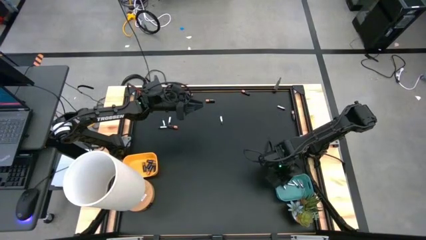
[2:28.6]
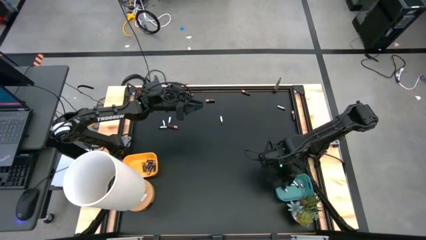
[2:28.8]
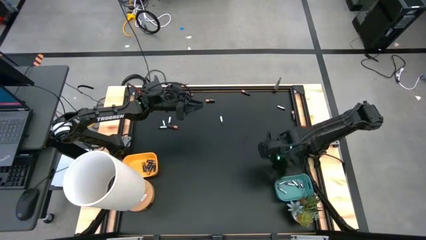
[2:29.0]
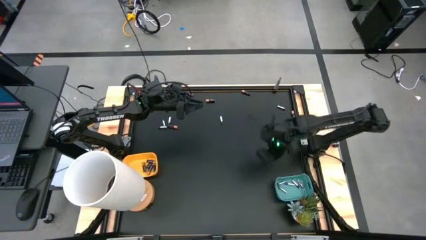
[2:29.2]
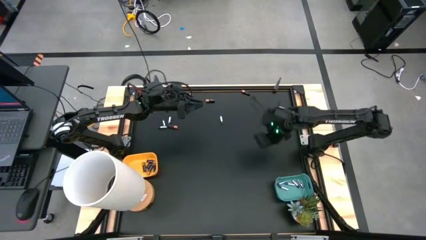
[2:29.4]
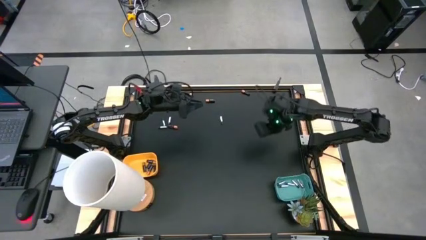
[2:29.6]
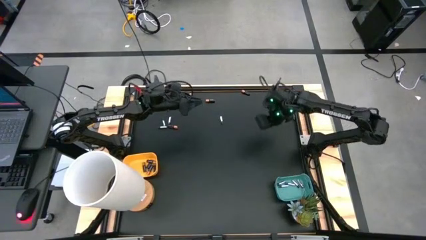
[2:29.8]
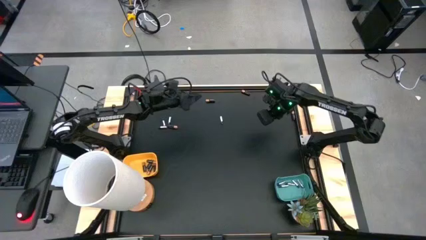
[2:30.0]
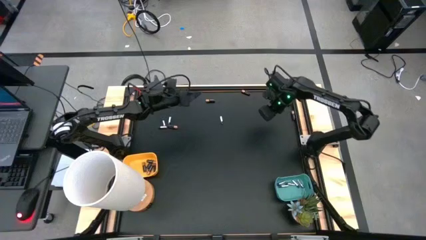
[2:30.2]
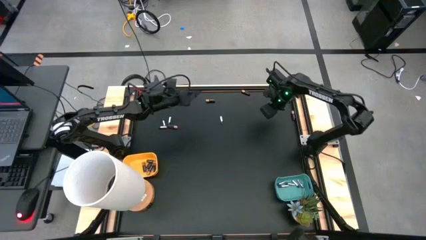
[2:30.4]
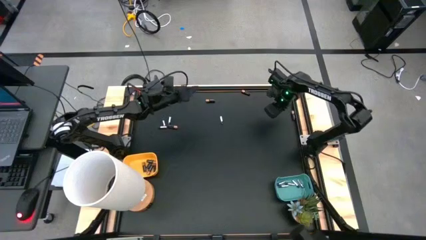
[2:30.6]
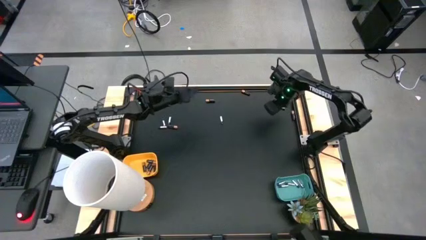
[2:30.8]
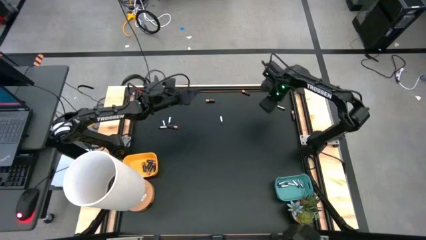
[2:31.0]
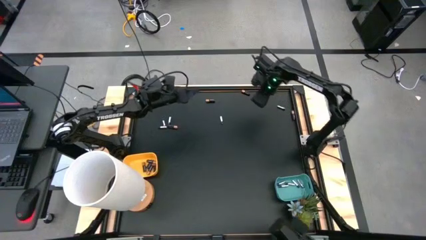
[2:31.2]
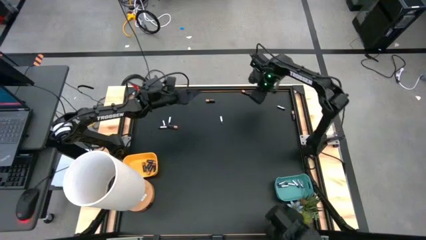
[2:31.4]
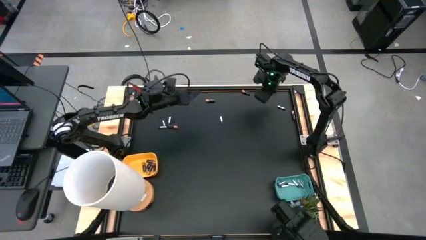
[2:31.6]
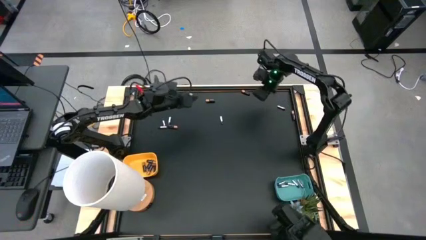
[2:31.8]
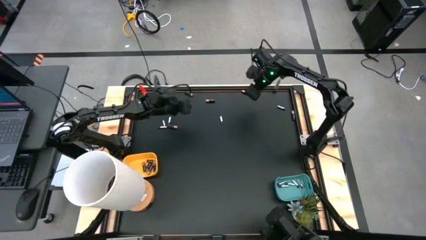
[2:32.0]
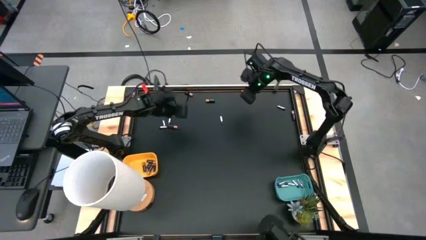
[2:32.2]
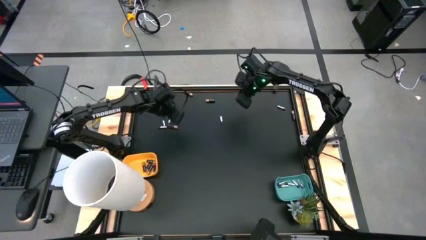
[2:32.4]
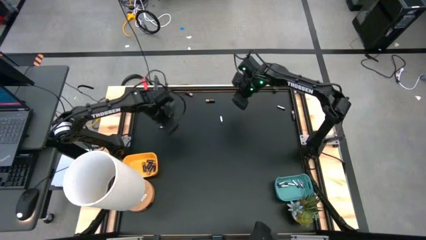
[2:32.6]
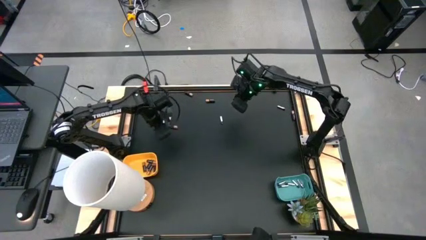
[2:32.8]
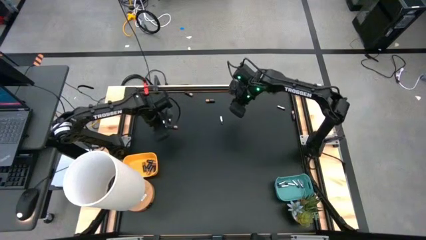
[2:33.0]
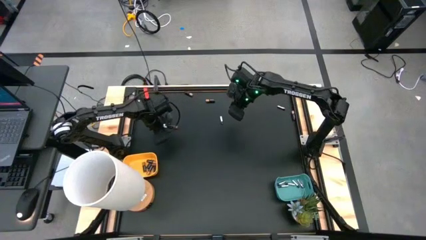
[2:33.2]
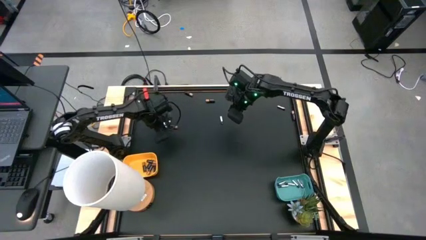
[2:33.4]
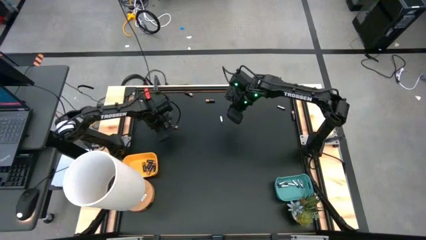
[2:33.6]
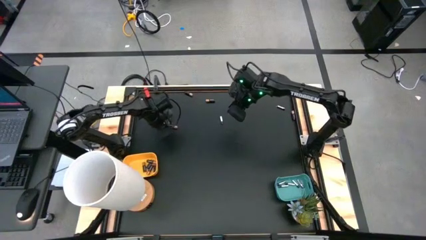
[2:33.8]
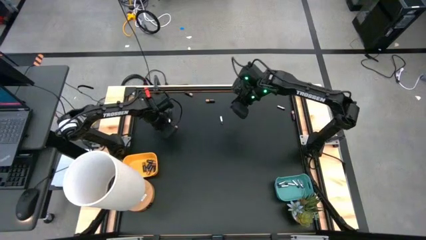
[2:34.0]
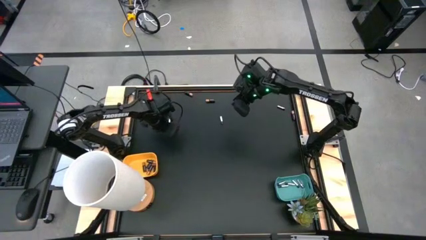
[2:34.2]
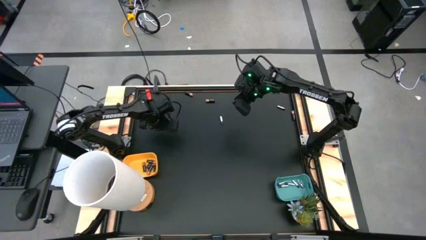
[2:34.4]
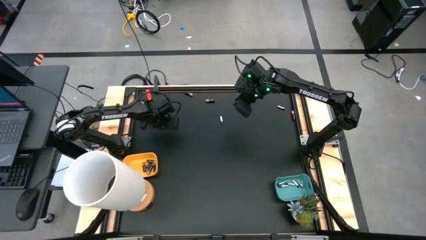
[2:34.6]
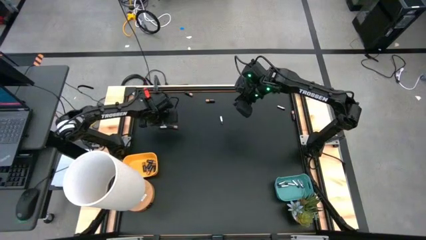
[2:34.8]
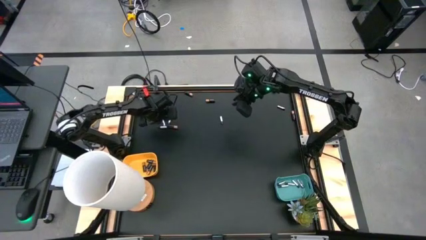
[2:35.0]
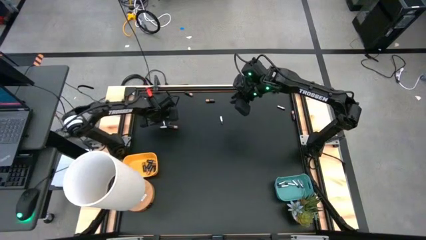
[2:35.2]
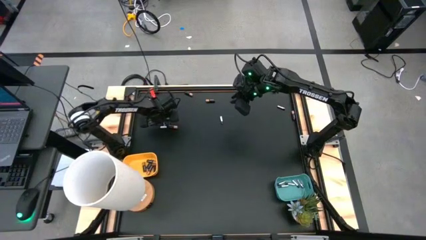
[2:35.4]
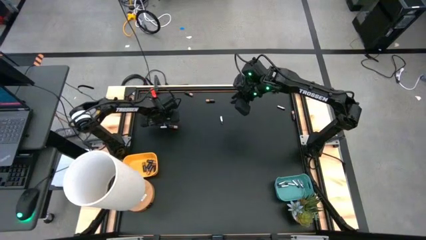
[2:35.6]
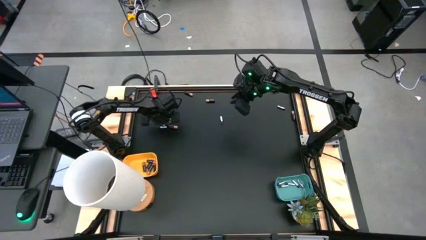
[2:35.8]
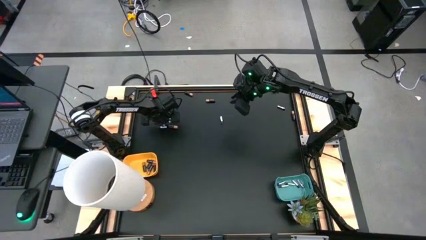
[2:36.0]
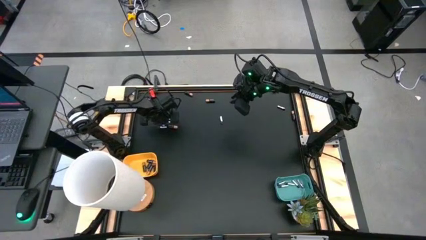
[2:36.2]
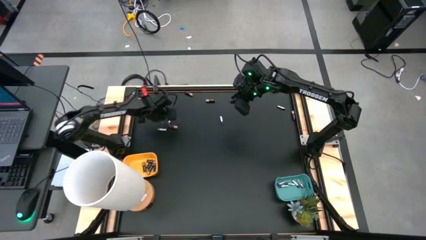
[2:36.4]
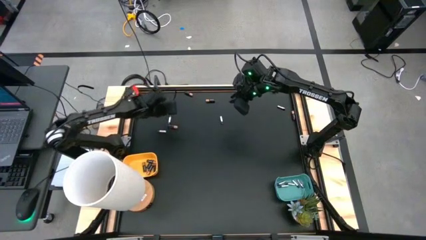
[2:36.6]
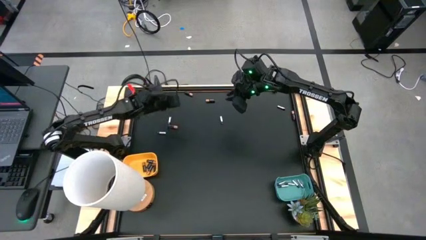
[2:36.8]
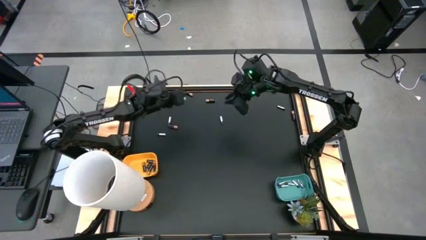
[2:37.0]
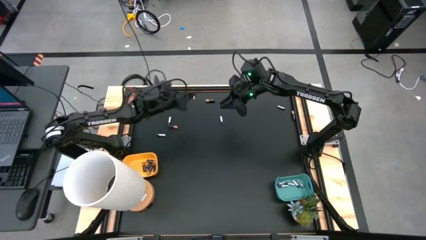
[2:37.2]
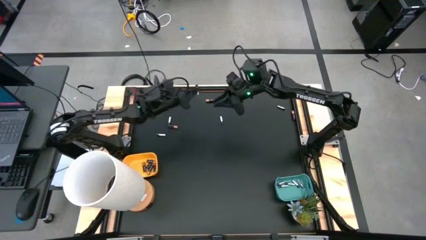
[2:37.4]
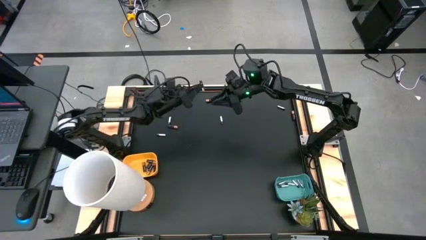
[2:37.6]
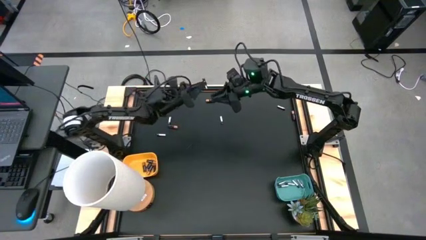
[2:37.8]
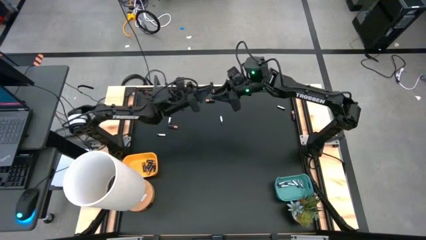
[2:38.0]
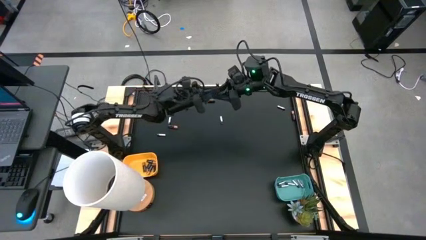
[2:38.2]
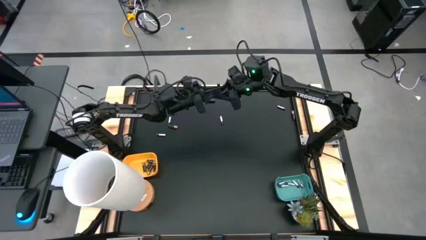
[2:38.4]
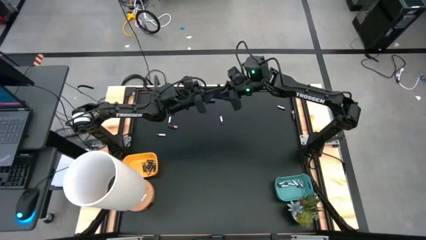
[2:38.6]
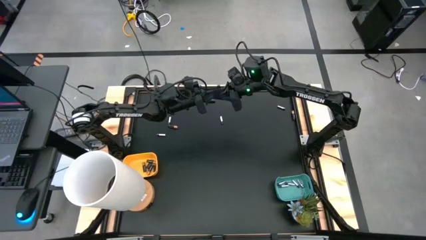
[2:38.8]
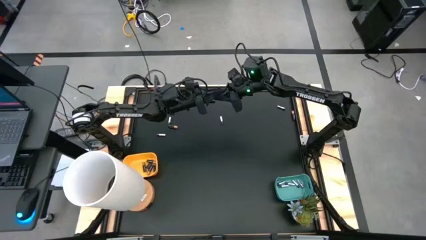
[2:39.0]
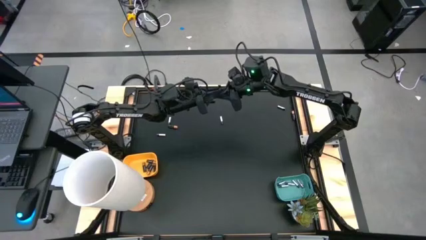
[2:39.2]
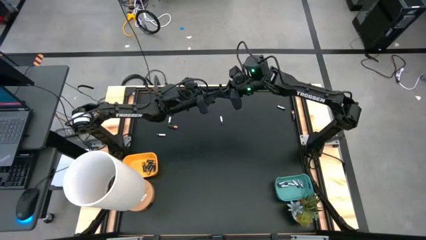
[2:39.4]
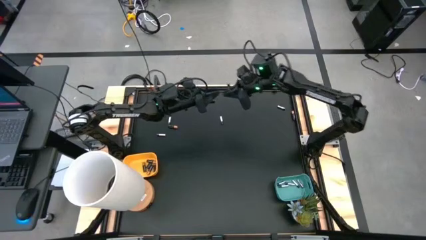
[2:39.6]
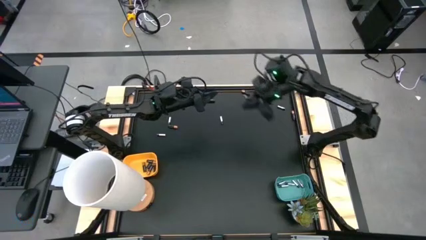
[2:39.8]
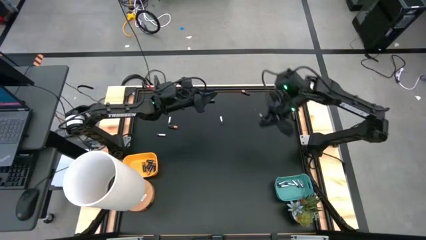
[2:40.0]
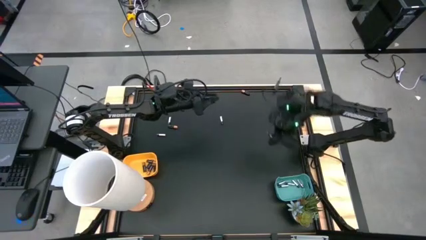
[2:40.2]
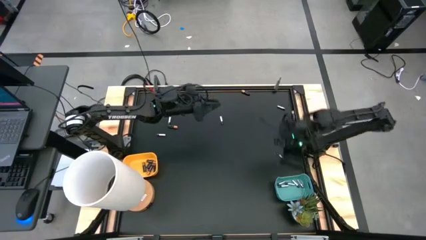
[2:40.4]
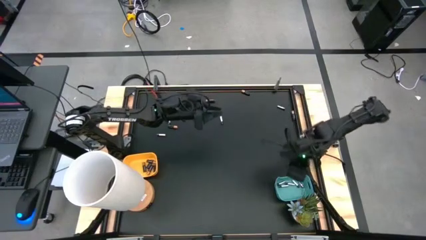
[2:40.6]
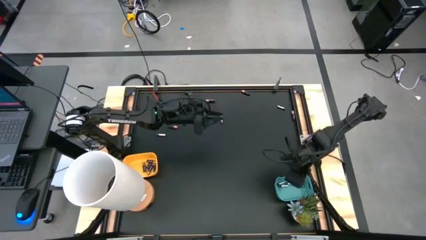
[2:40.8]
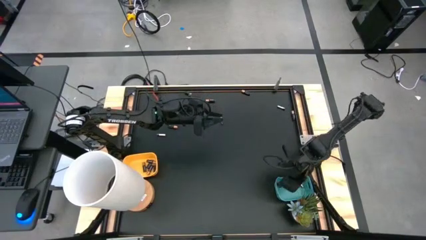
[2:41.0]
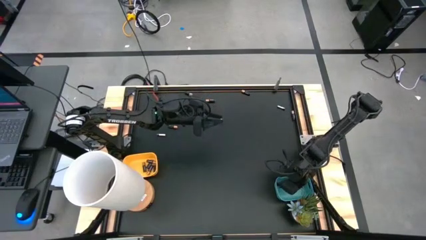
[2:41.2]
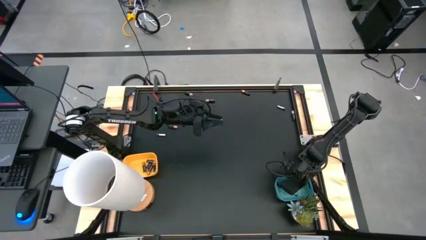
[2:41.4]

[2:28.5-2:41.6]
Task: Sort batteries
Put the silver battery into the green bin

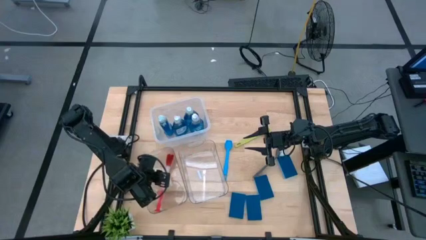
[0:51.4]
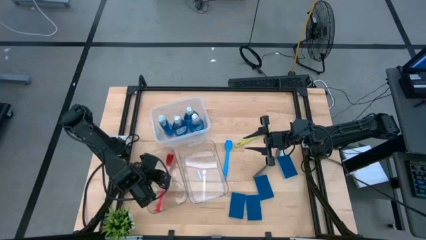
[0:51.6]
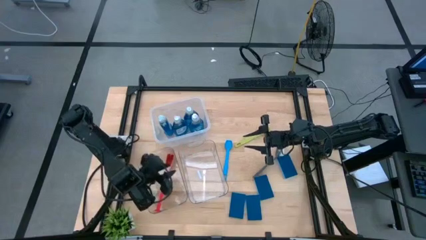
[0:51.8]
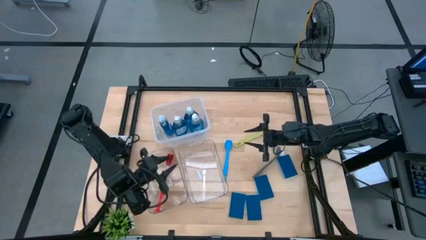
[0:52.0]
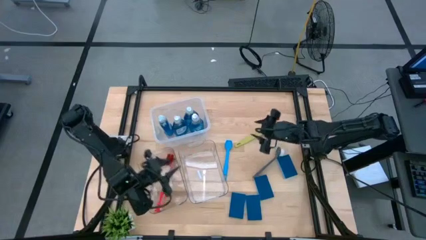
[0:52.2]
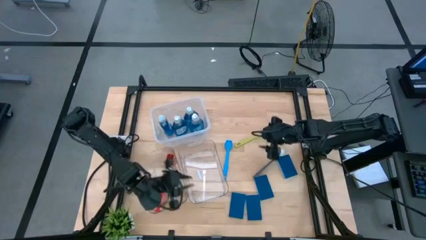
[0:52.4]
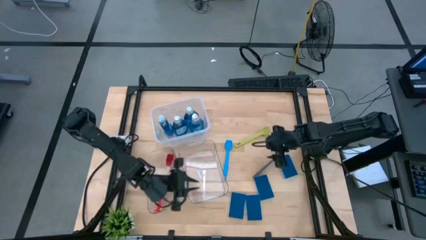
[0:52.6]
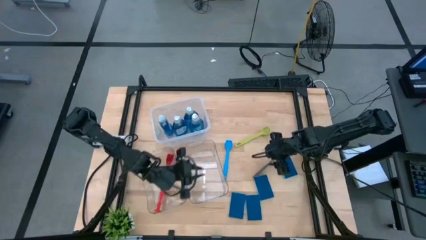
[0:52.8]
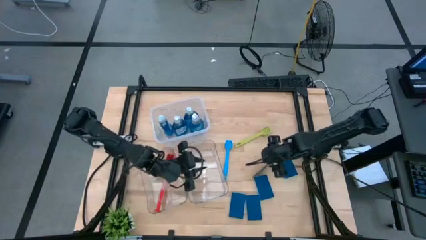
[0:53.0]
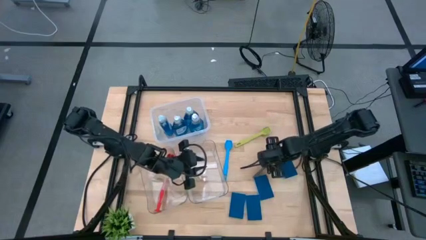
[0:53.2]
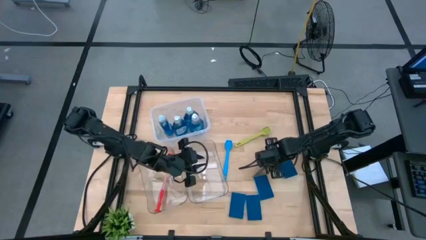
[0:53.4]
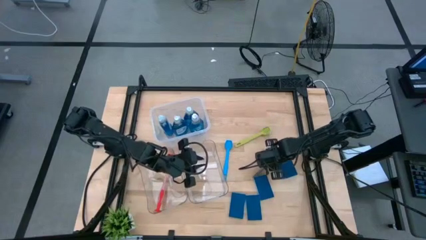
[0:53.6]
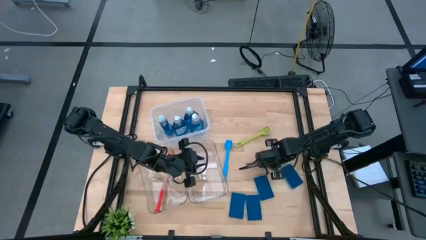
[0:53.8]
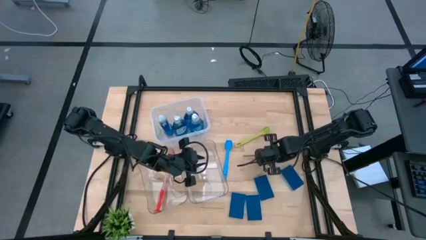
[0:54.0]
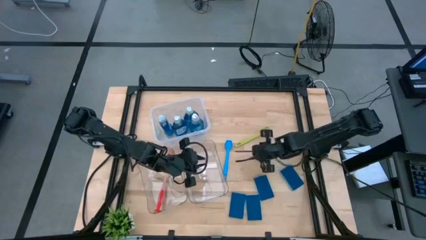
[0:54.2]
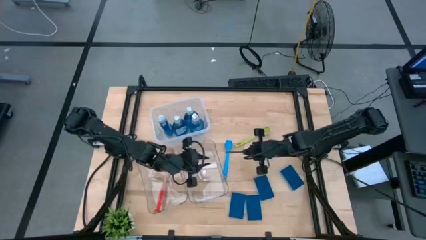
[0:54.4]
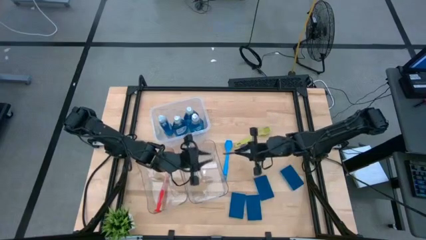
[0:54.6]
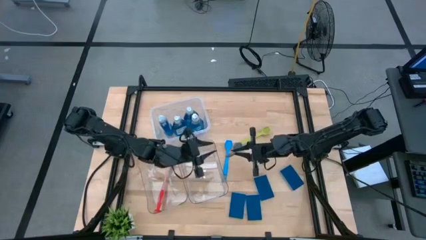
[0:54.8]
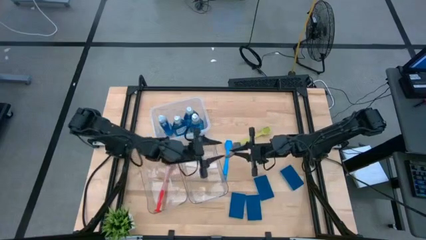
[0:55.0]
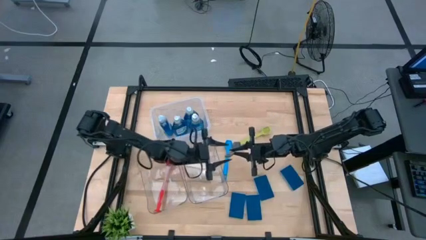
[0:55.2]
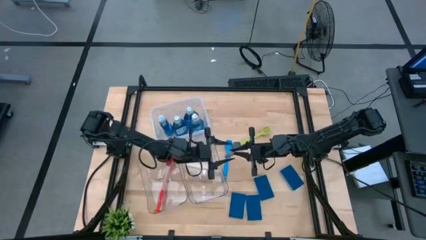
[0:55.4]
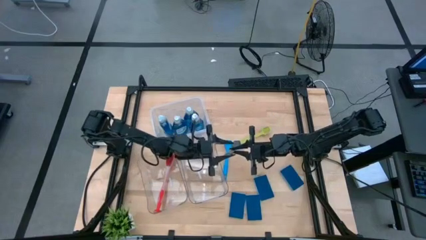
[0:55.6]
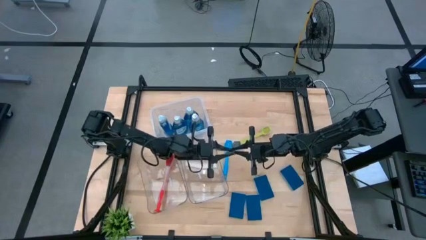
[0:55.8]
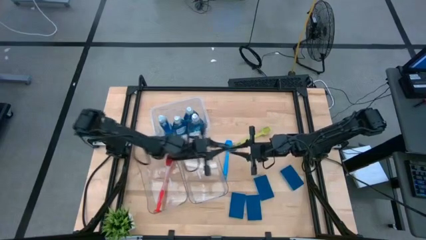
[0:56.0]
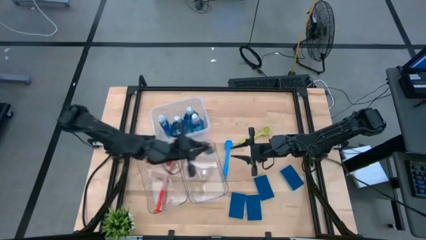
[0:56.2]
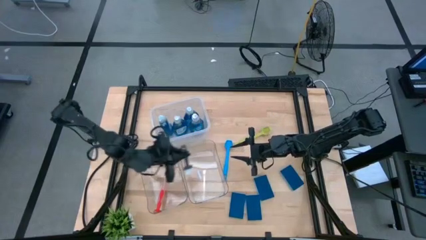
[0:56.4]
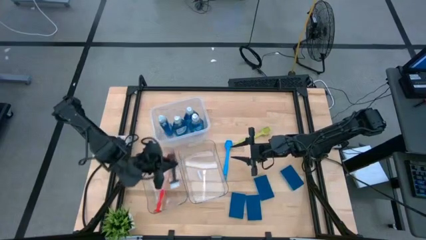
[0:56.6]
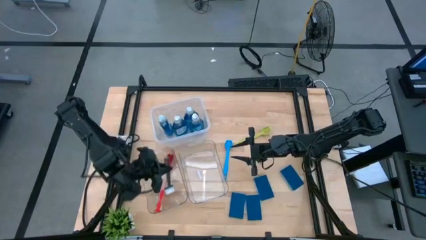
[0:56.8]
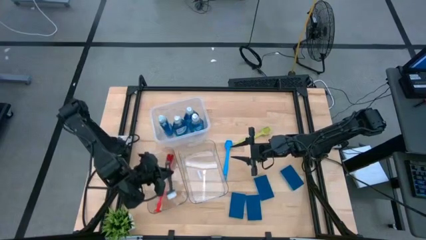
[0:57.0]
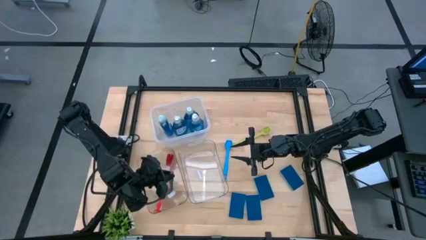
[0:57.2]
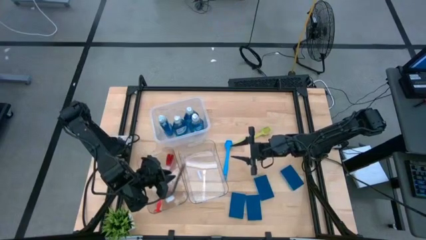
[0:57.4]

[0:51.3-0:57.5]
Task: Pick & Place Kitchen Sink Supplies
Put the gray dishwashing brush into the left transparent bin
